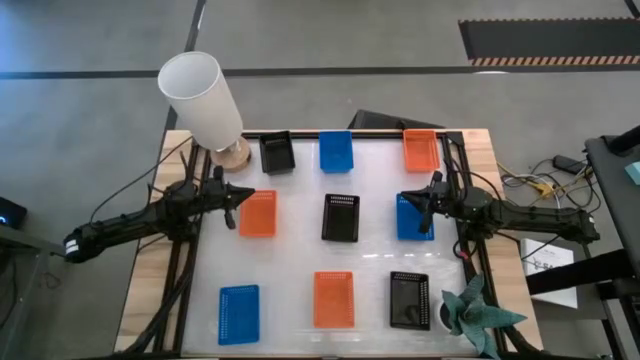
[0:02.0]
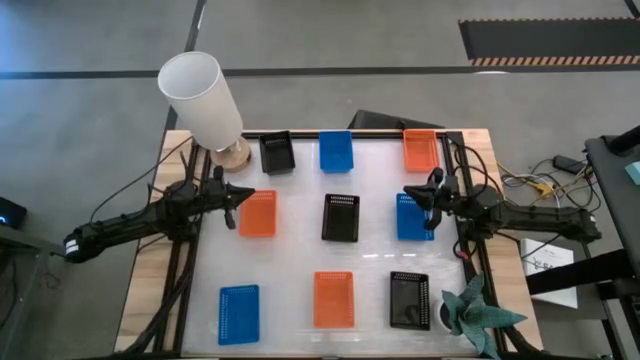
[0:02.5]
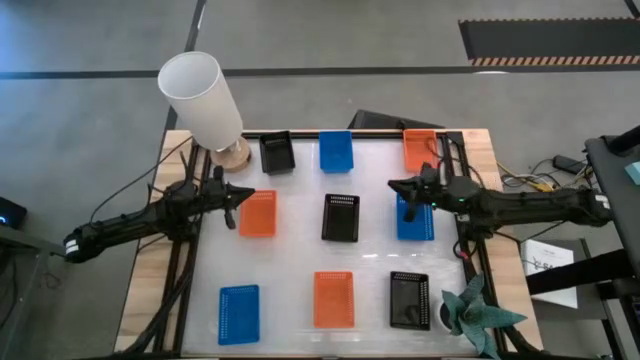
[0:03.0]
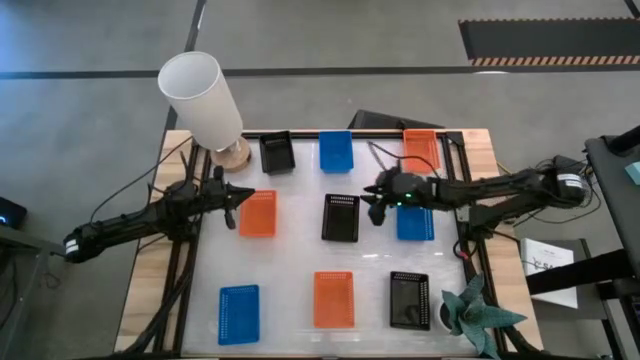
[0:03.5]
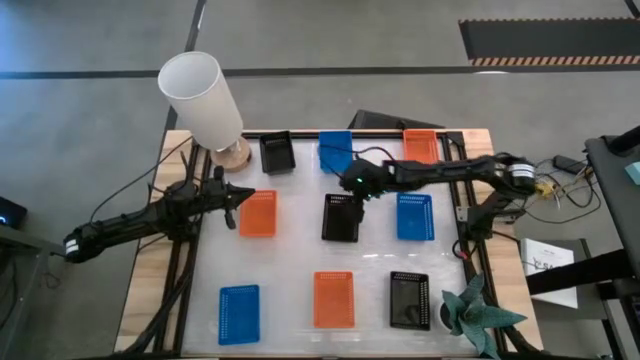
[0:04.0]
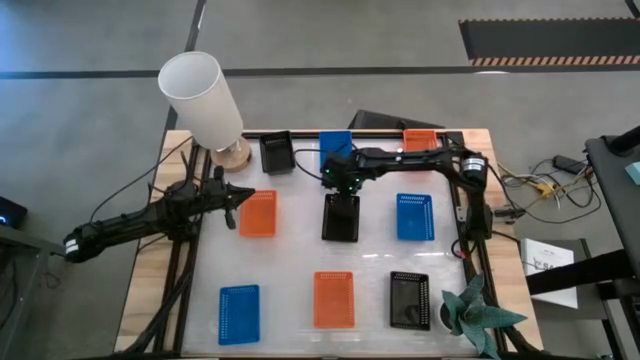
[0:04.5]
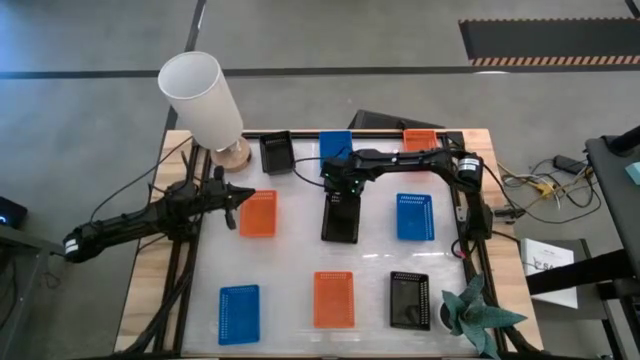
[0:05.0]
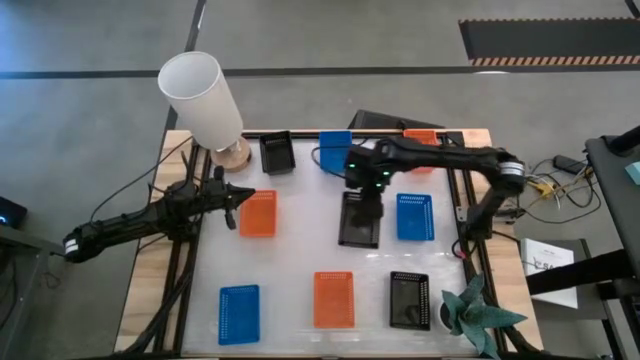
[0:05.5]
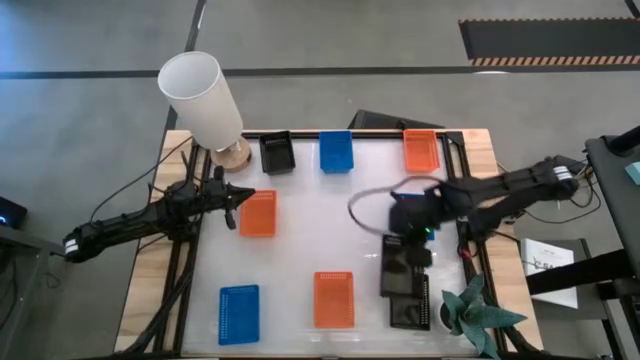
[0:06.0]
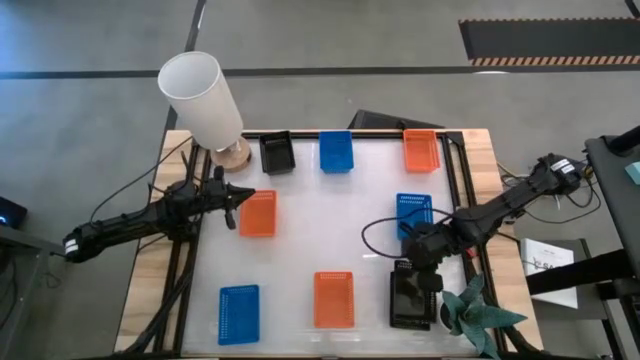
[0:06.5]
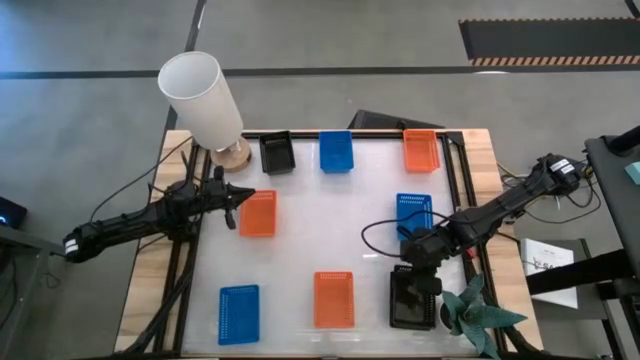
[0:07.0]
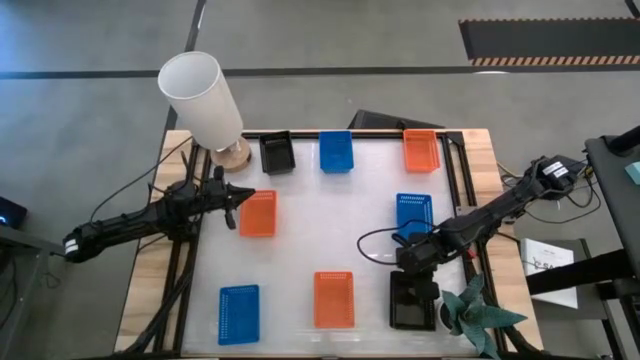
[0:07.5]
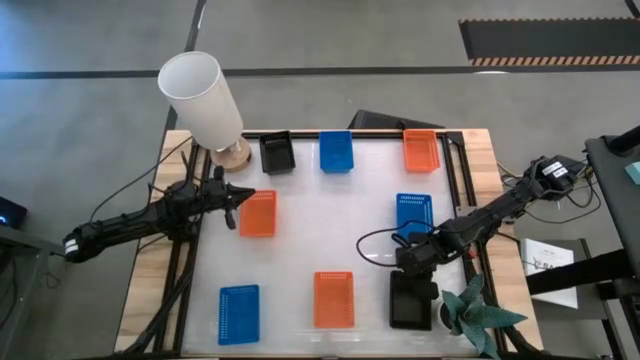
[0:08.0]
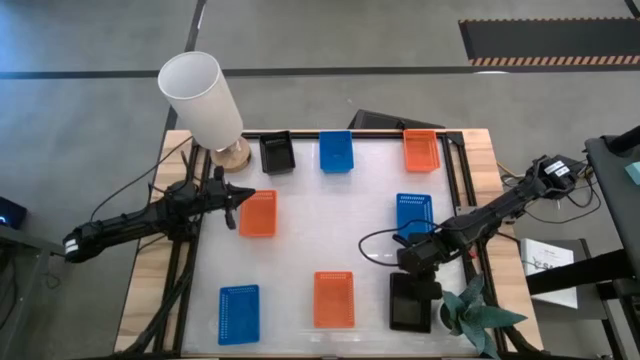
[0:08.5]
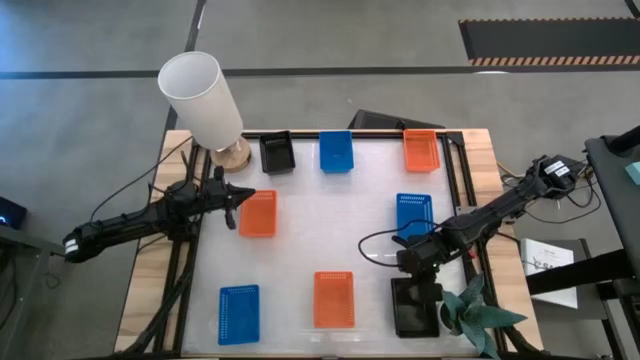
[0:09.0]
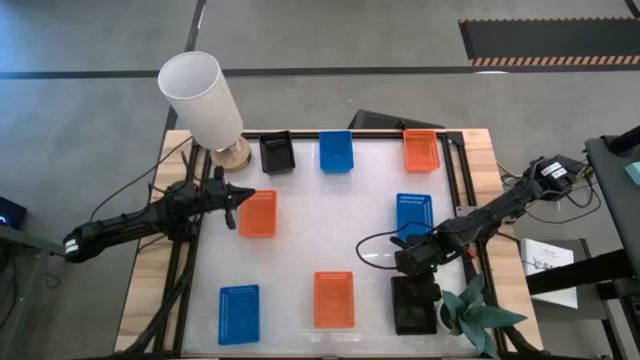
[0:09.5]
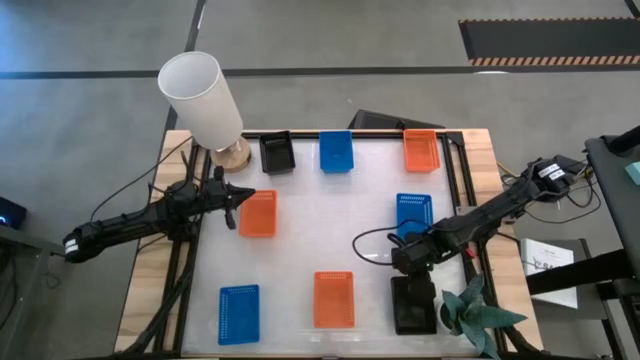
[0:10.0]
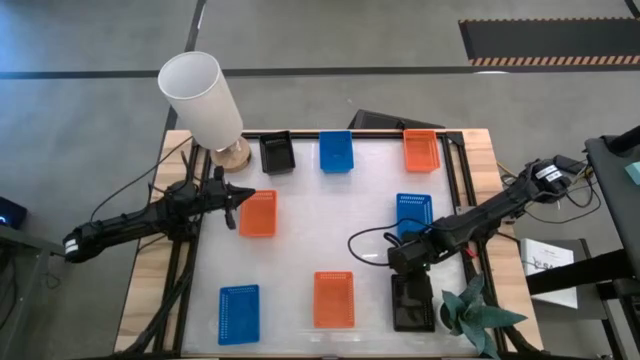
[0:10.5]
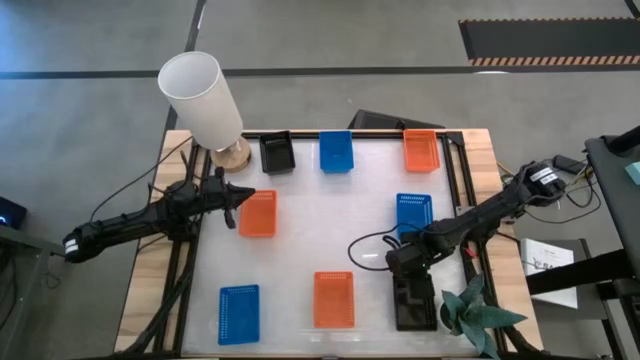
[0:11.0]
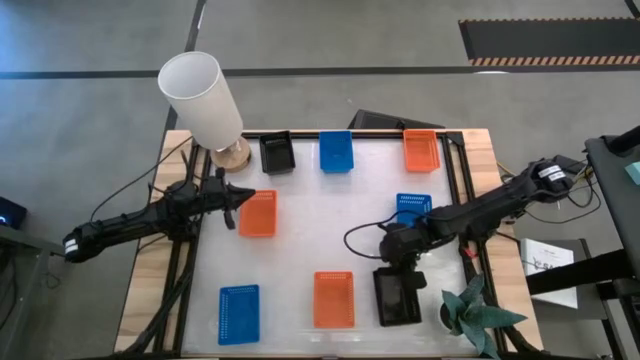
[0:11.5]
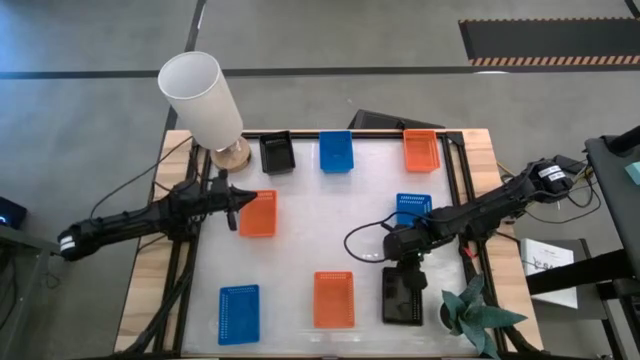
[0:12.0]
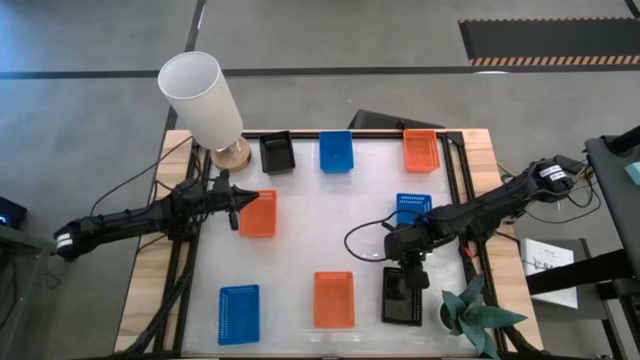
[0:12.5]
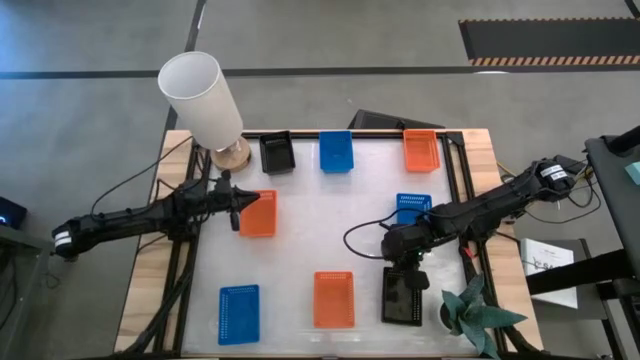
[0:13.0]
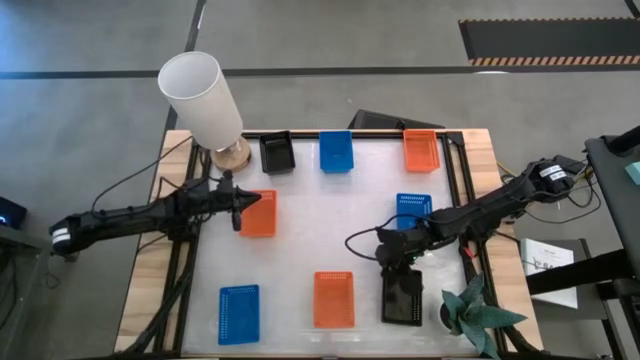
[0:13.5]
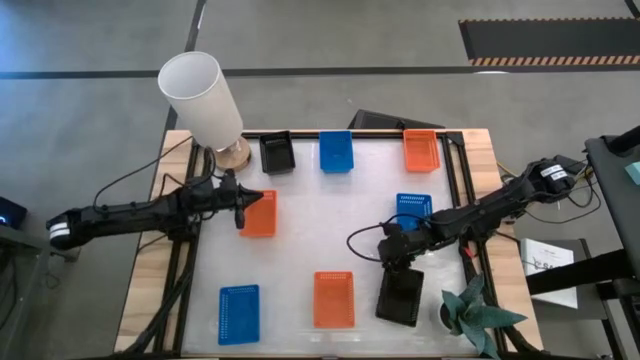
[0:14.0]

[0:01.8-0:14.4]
Stack the middle black bin on top of the bottom right black bin
